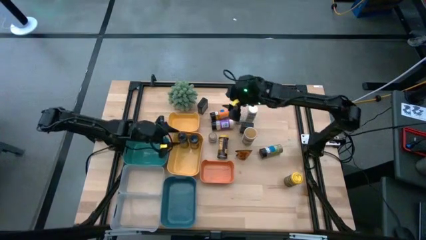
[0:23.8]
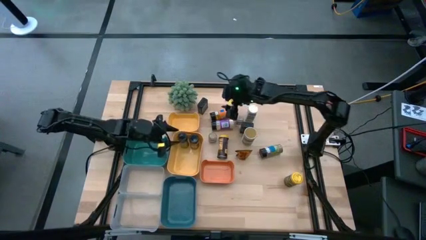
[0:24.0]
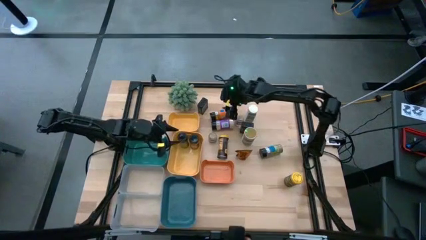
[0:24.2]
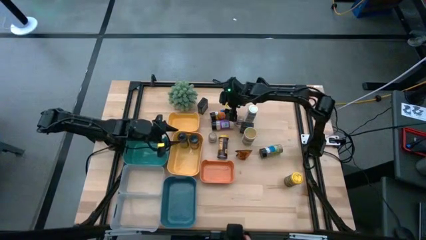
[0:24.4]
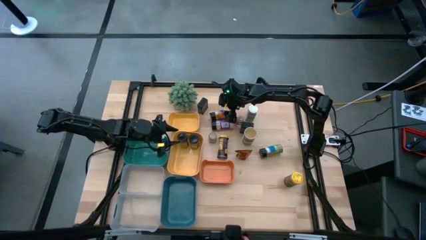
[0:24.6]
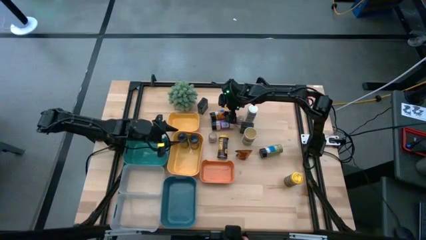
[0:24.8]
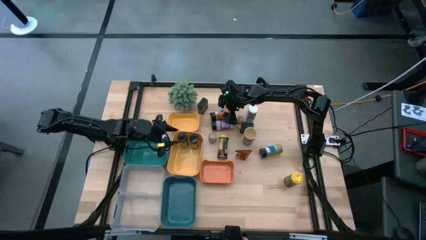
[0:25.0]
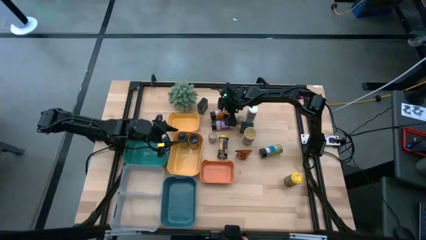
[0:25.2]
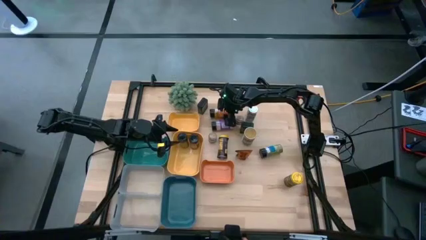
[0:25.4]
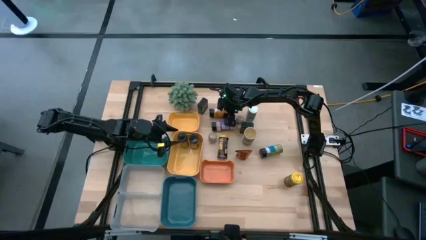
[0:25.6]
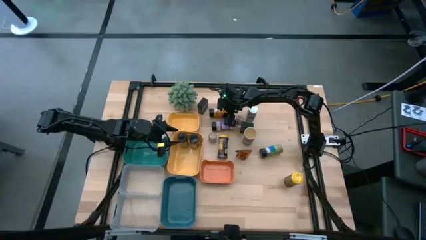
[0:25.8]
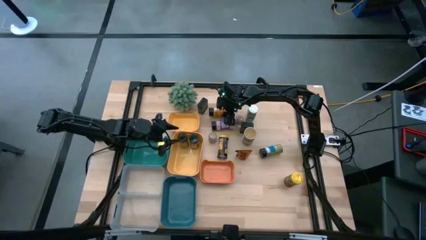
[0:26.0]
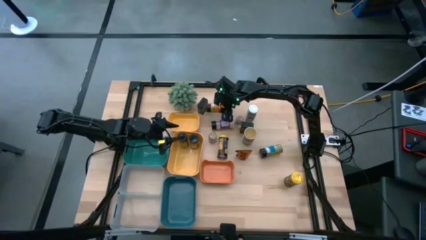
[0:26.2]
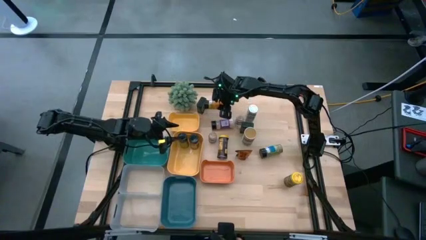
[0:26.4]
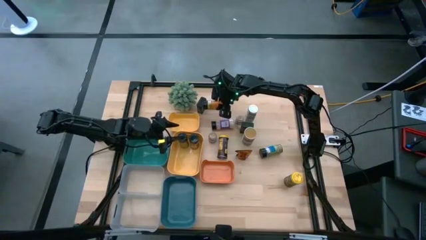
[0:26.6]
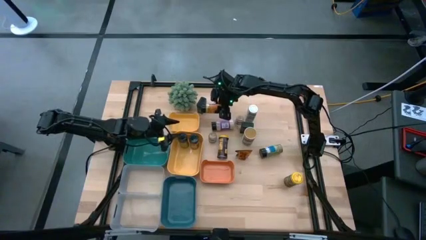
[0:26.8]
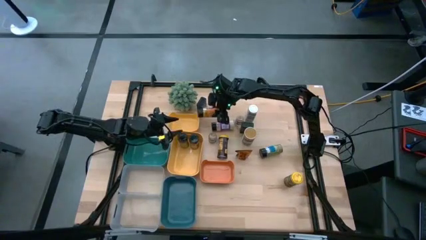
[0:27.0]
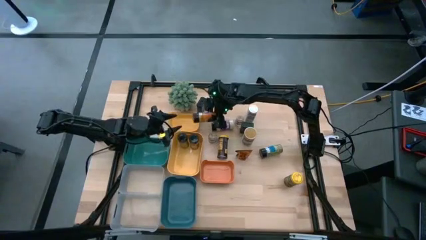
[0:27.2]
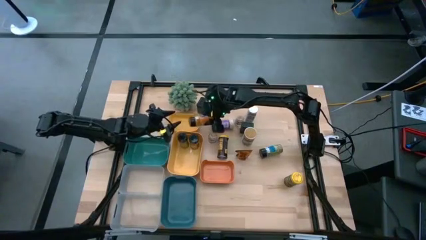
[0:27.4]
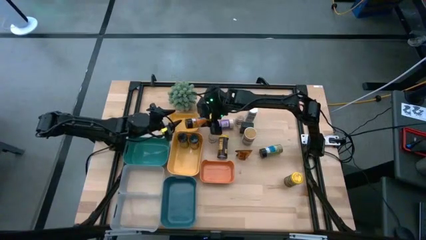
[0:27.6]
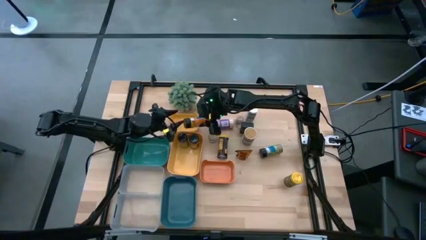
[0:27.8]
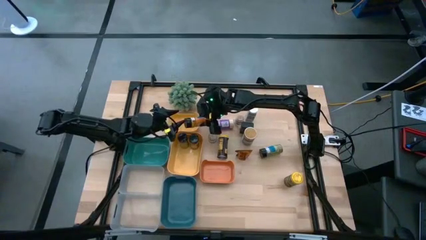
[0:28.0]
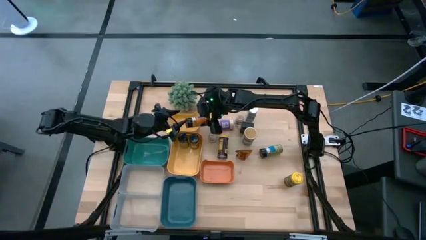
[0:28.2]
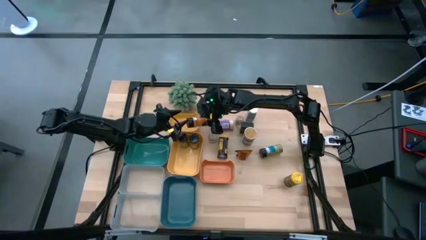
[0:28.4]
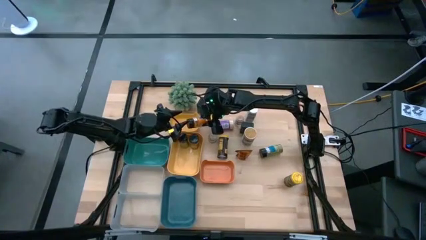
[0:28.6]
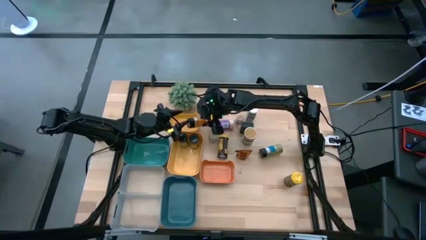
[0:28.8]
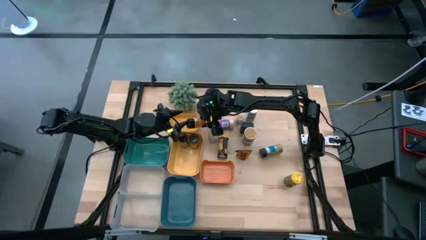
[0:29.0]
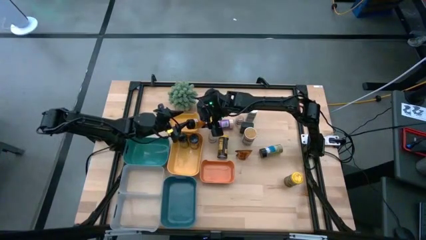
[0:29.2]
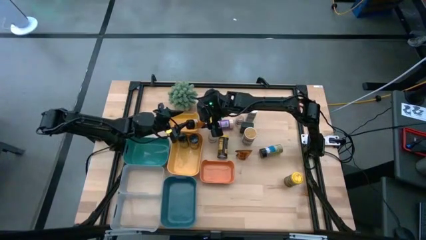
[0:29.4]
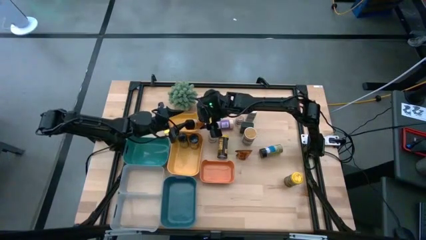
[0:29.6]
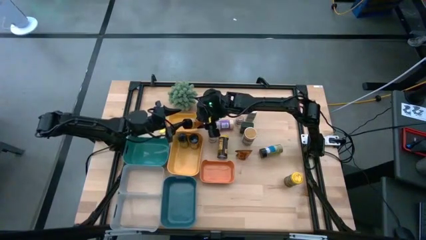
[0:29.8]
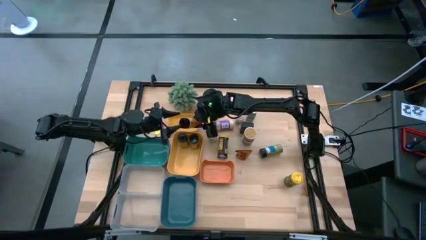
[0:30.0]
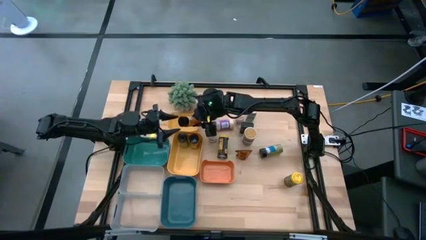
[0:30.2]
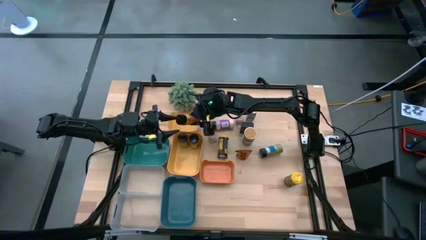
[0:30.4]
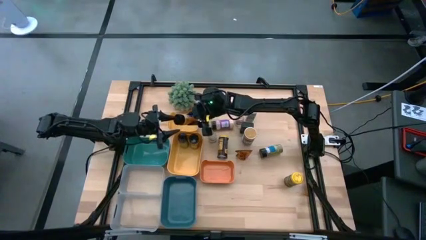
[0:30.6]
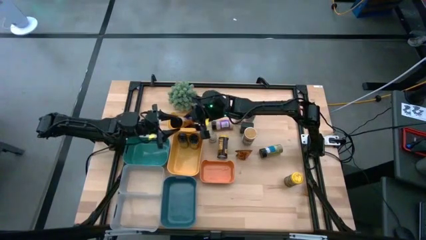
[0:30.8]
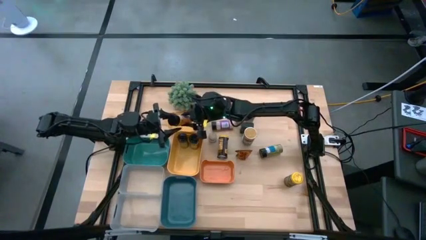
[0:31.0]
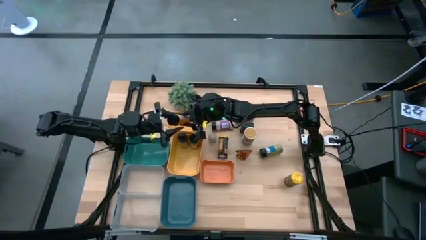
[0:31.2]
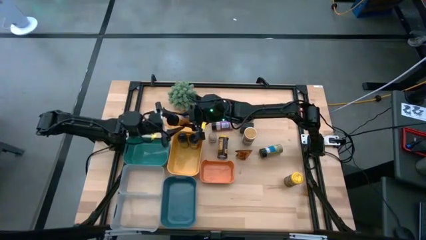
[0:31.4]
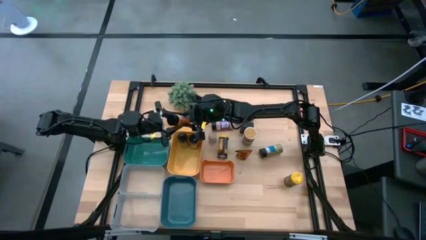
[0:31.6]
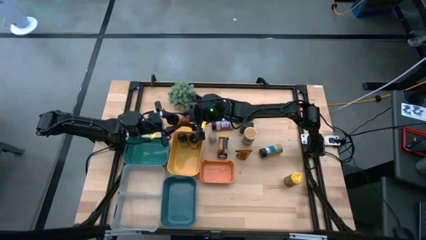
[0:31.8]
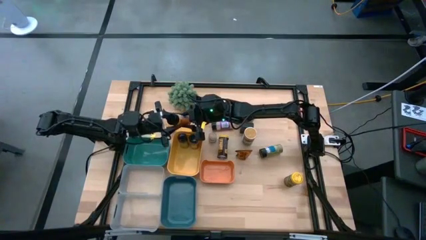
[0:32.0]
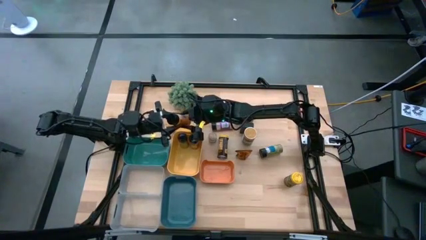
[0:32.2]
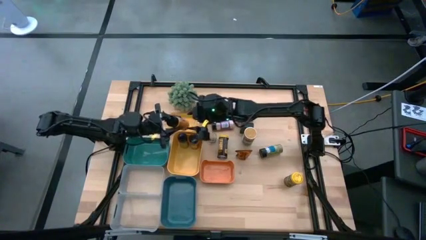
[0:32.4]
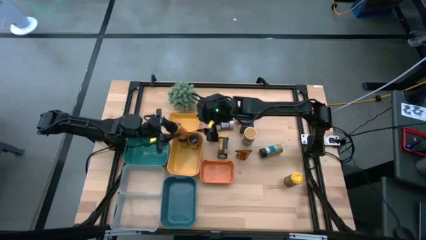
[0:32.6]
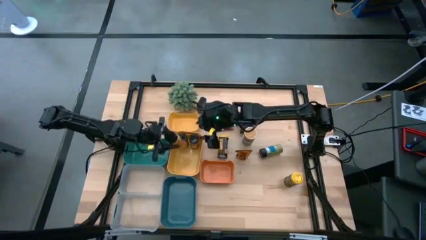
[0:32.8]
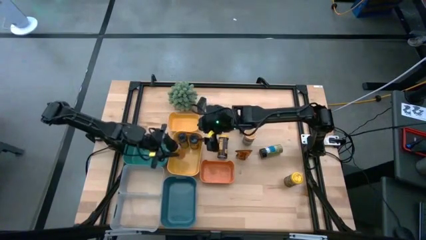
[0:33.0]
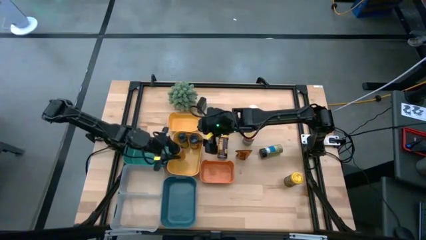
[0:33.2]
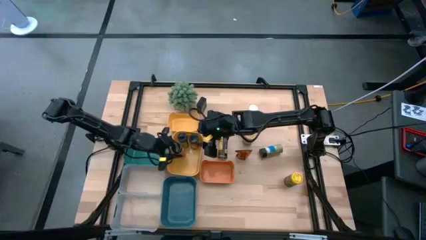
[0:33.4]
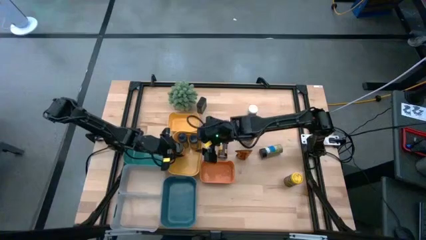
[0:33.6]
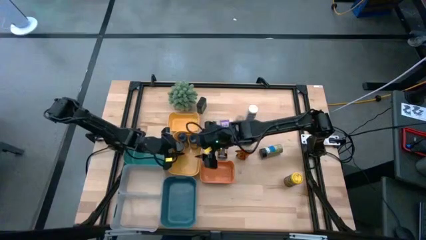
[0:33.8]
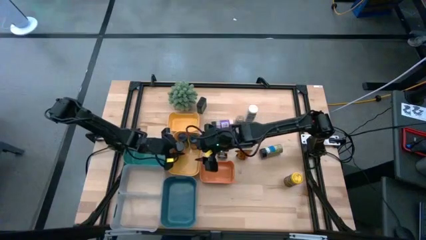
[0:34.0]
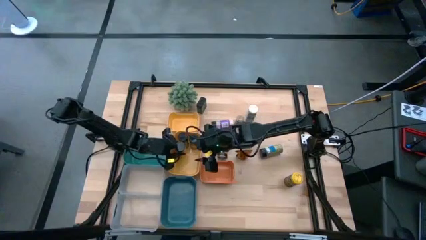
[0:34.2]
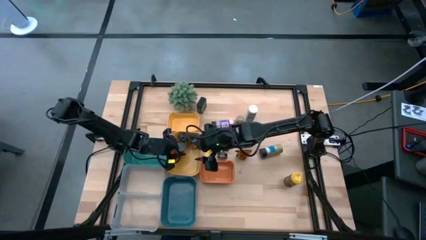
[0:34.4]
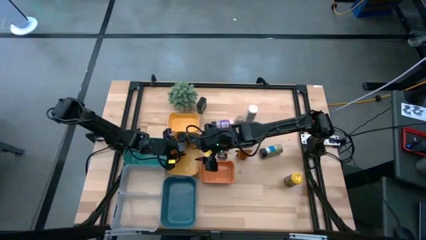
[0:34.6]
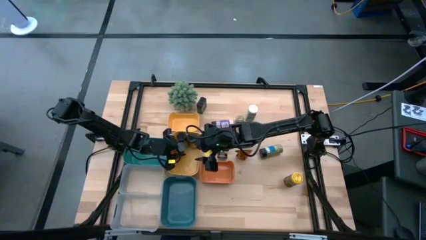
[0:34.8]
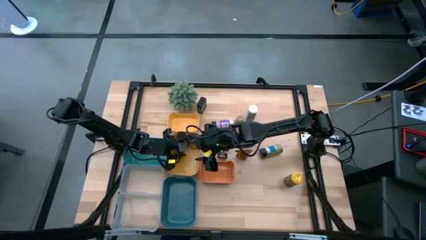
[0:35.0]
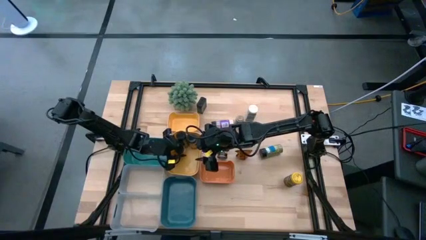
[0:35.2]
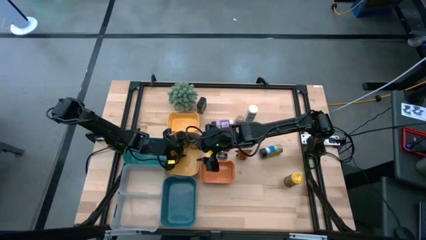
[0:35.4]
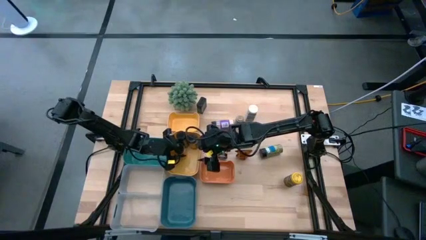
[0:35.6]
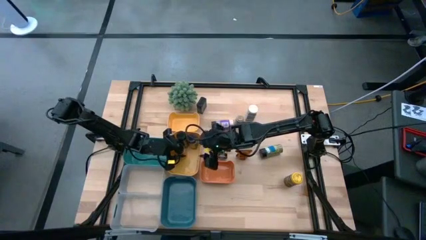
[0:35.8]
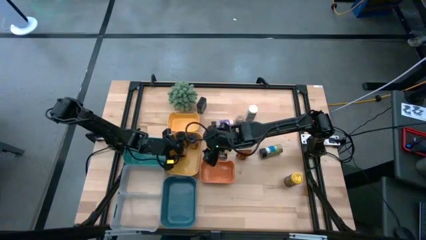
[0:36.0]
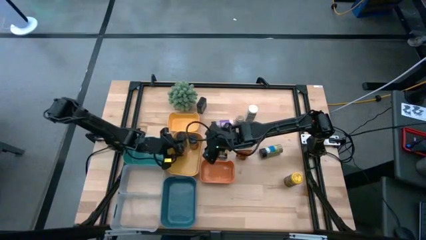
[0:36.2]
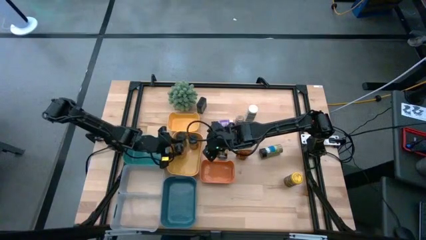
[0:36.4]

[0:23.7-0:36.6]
Task: Sort spices by type
Put the black seasoning bottle into the bottom yellow bin
